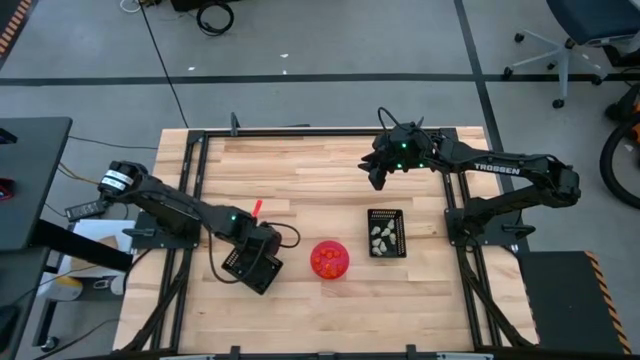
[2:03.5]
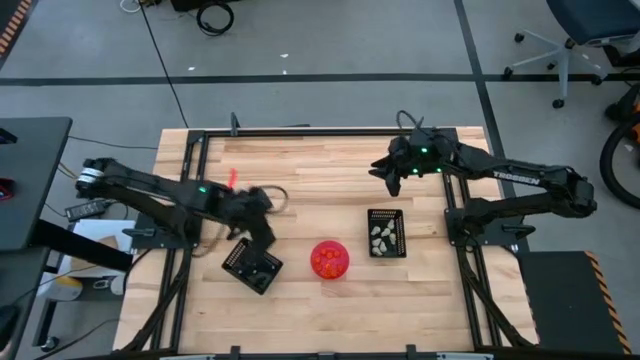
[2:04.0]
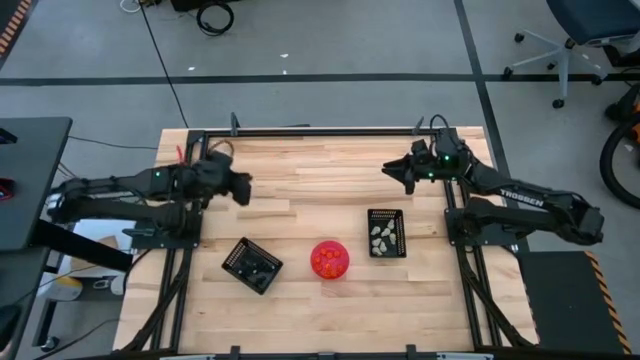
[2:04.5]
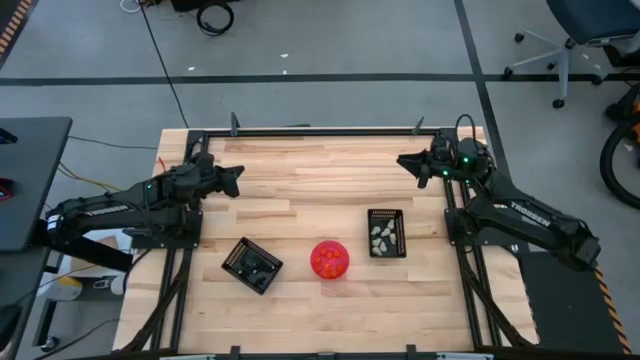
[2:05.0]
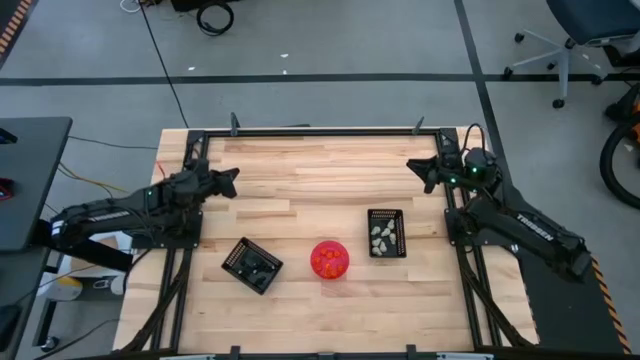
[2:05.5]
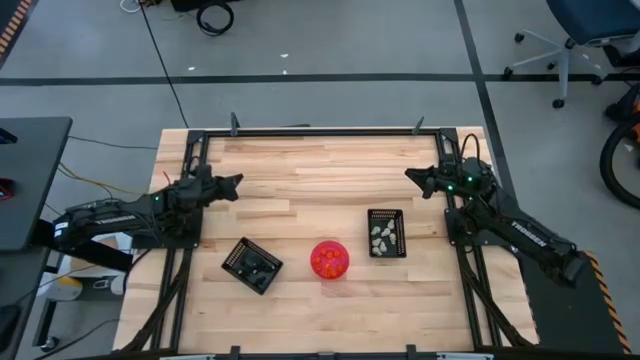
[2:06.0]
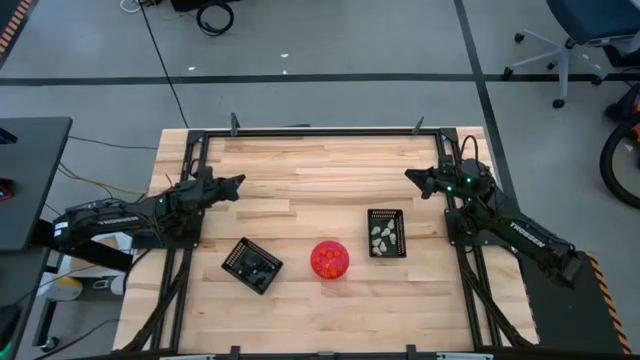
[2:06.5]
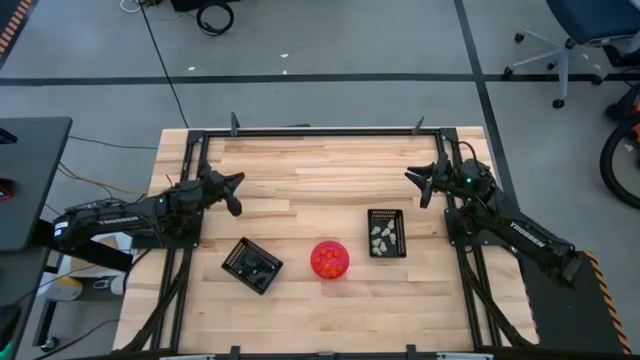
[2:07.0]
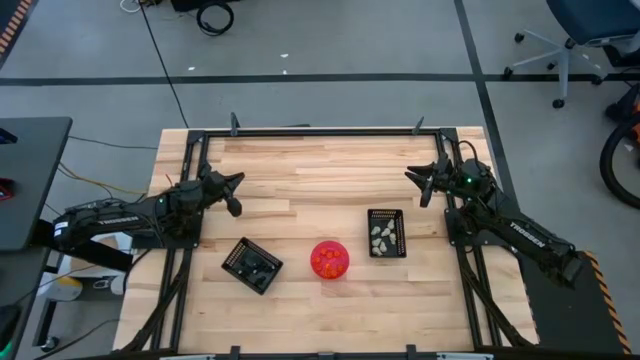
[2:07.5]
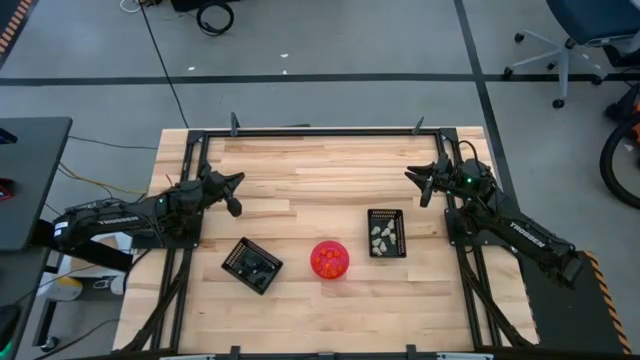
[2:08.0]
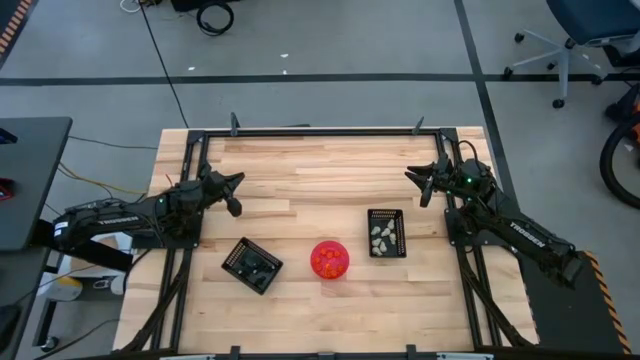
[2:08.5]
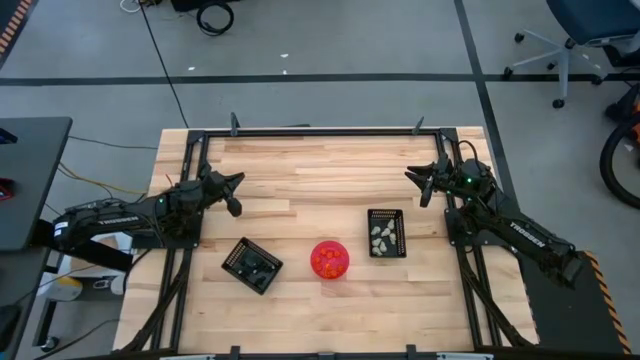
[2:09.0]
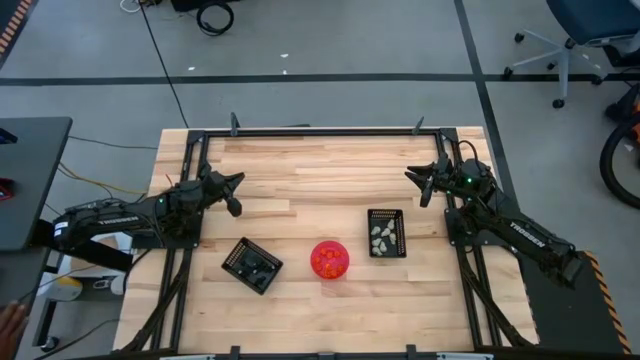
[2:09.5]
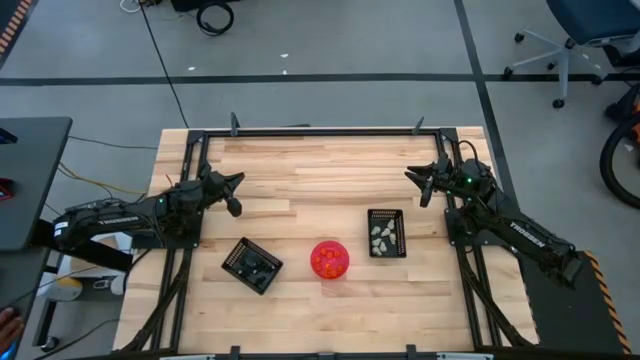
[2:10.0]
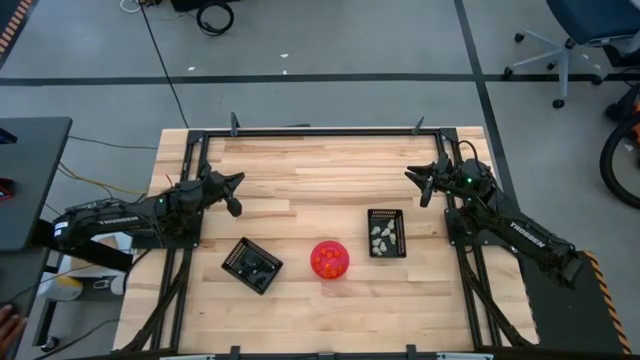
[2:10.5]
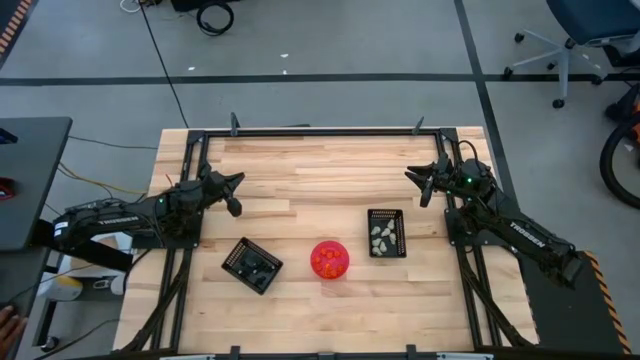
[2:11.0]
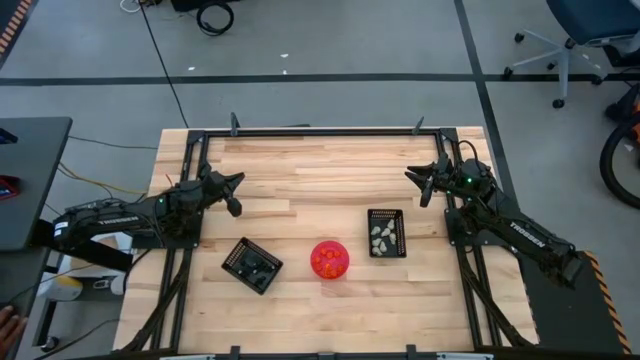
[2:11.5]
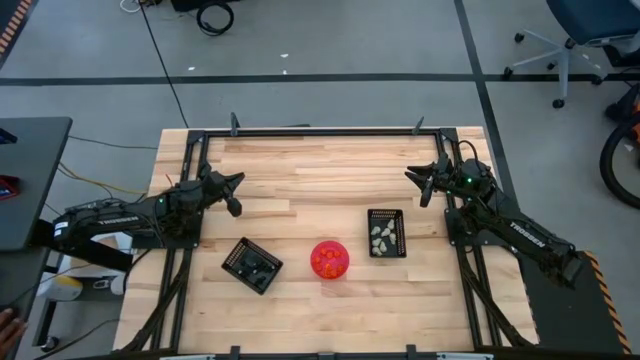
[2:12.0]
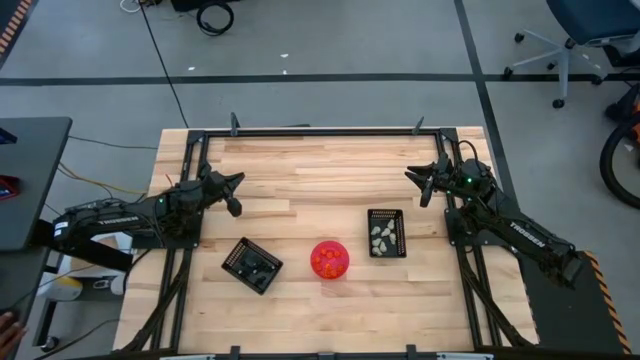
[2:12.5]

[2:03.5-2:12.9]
Task: Sort Halloween decoration
Return to Home Position

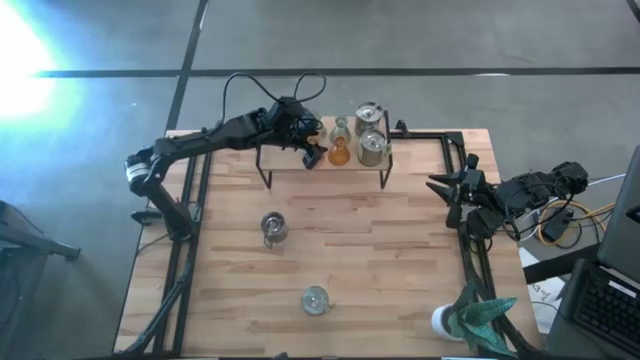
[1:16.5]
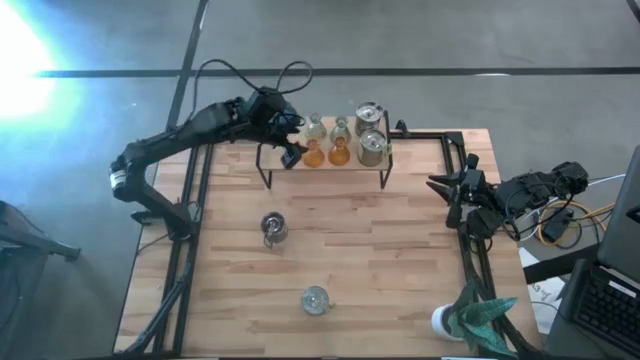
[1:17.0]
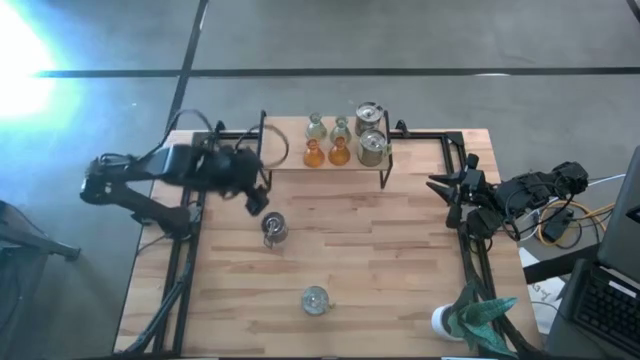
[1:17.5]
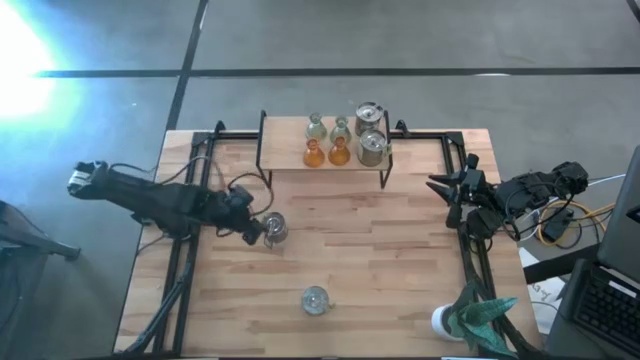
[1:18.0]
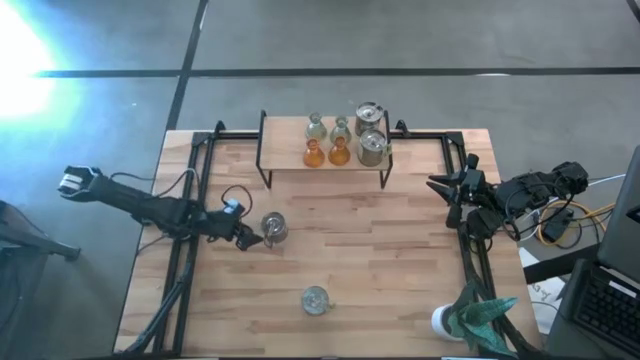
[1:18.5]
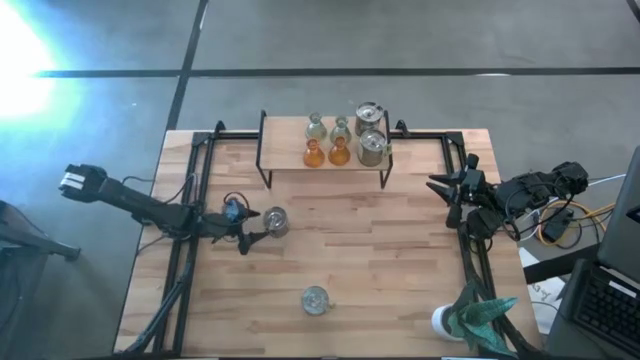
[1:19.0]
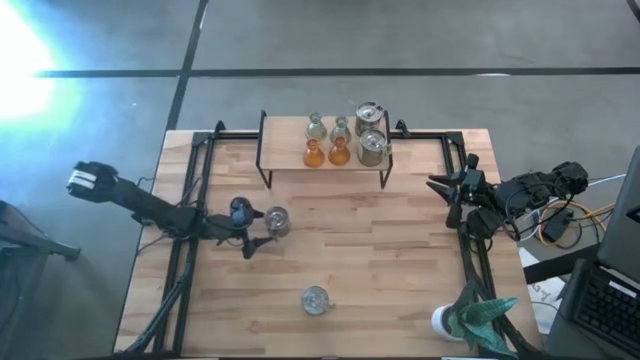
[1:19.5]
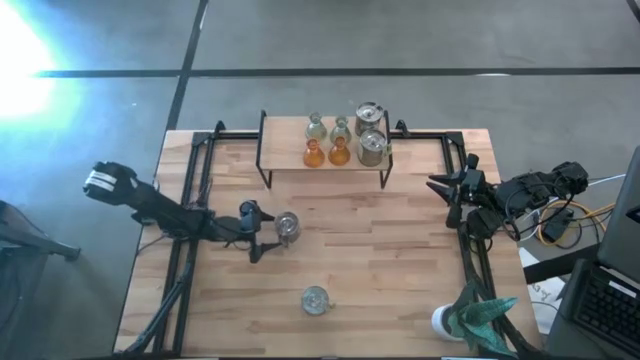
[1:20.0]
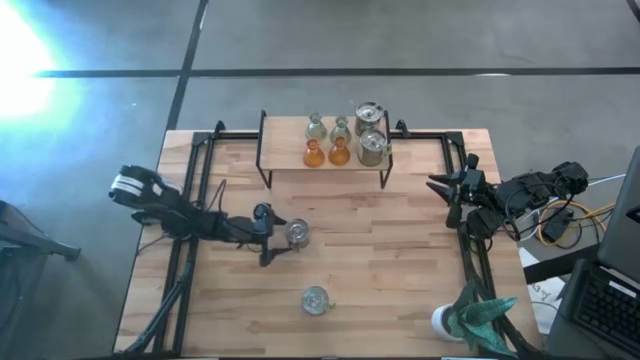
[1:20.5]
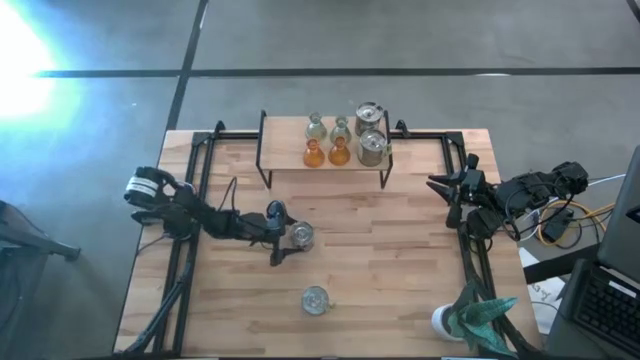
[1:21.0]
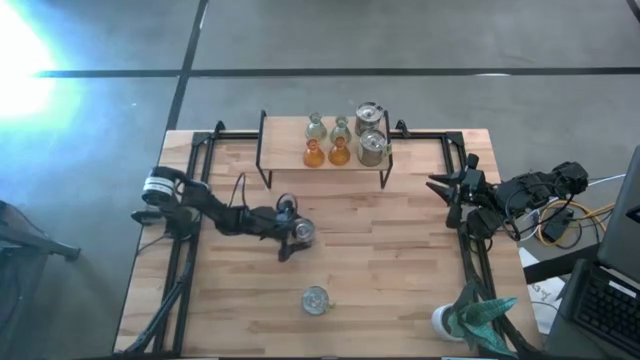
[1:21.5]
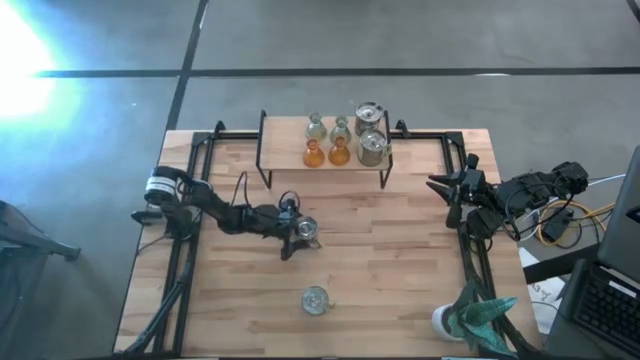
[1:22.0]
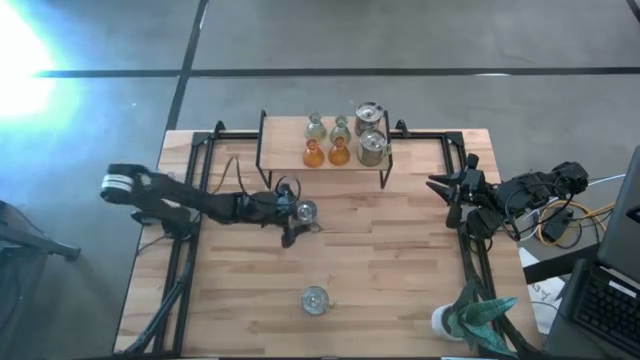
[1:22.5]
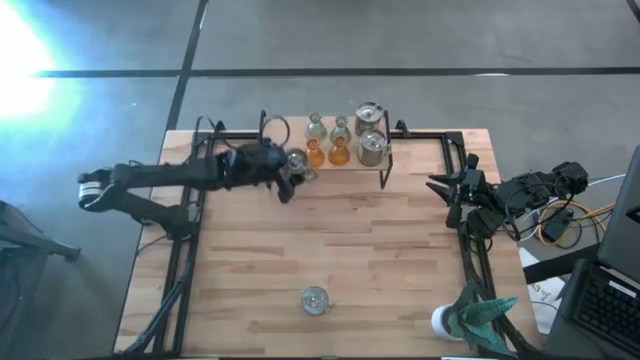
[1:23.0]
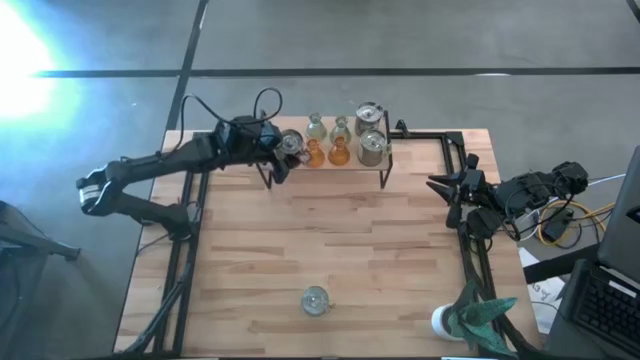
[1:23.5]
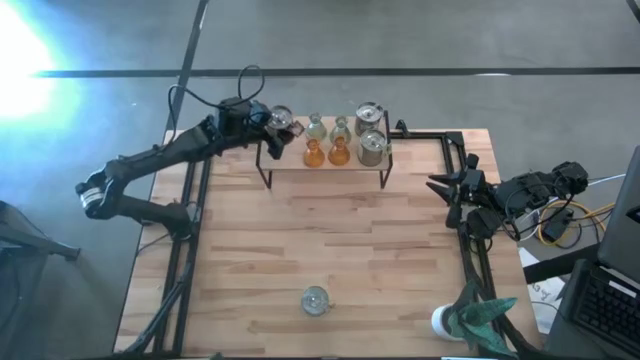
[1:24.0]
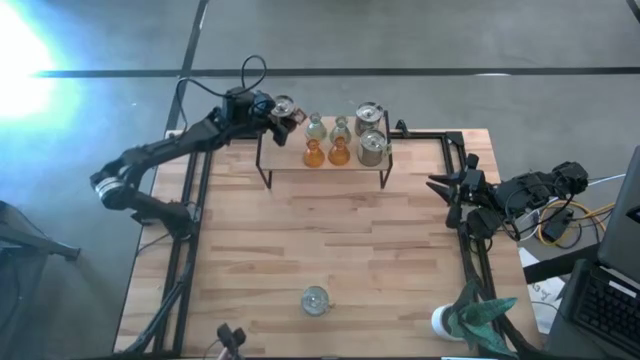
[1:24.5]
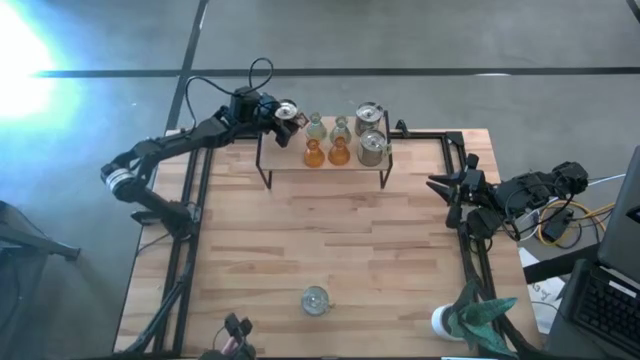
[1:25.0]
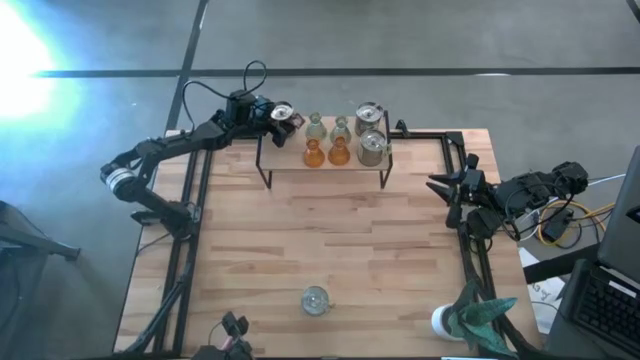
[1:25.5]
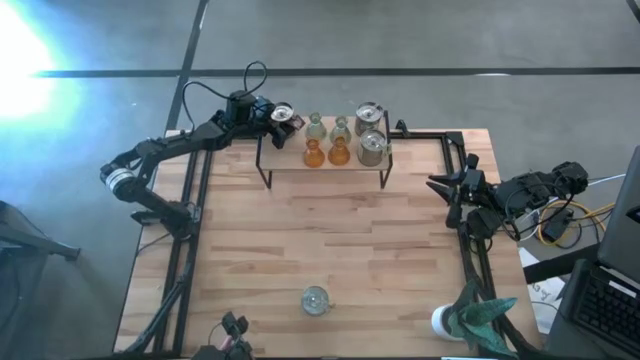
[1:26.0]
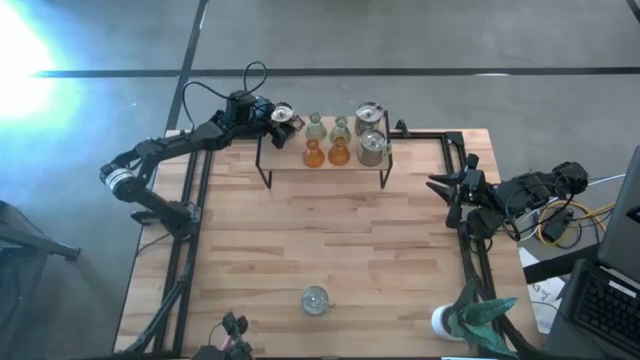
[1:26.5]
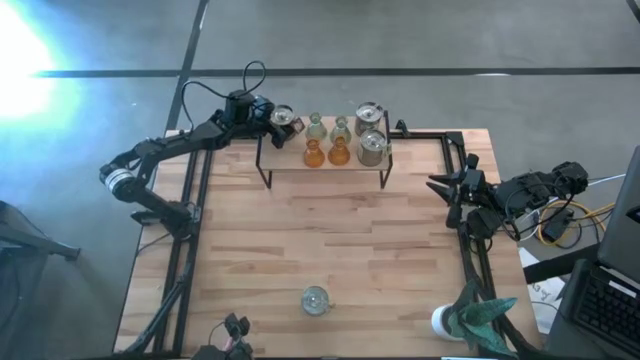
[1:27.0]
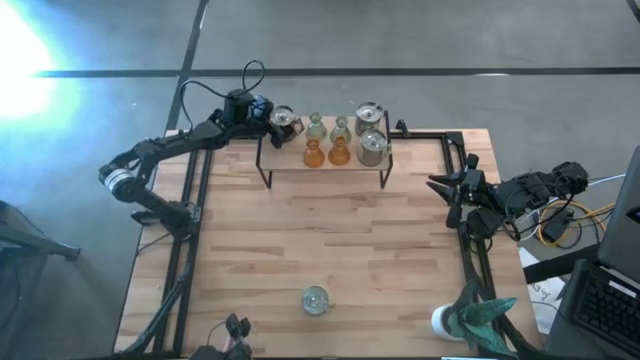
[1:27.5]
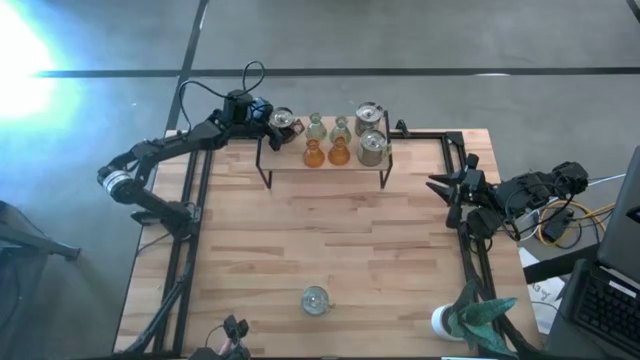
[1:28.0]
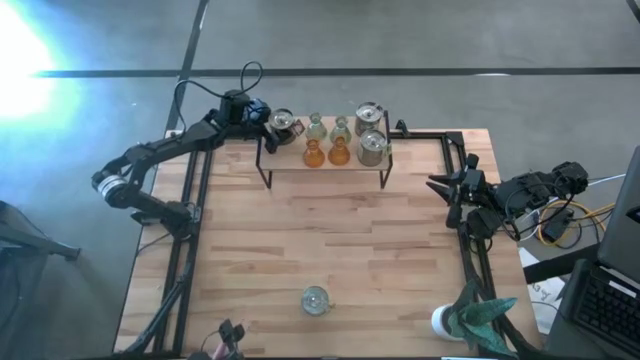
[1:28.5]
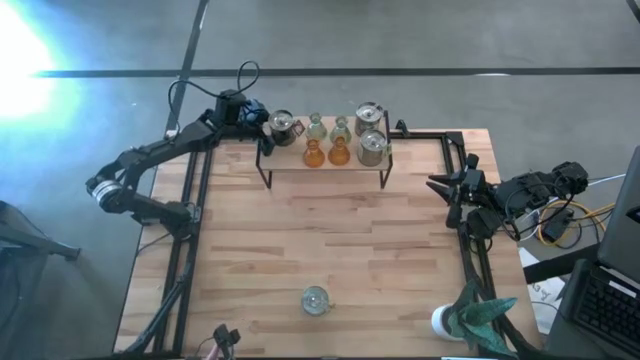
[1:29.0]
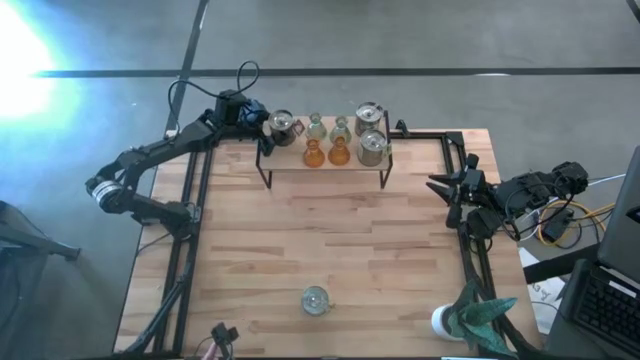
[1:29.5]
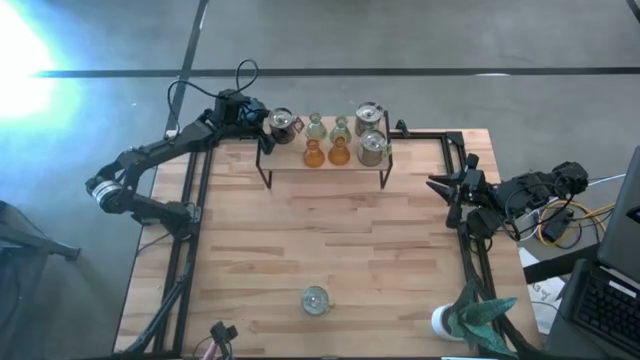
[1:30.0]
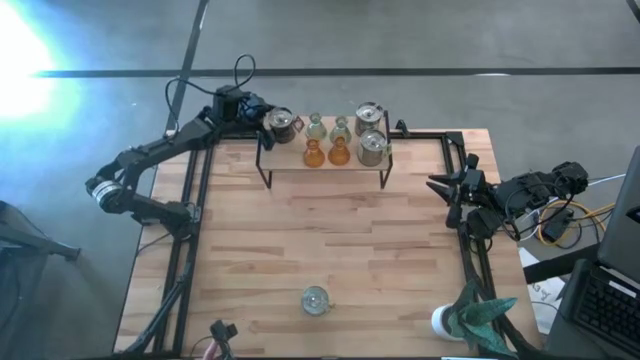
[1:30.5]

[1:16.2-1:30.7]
Task: Pick & Place candle stick holders
Put the brown scented candle on the shelf
